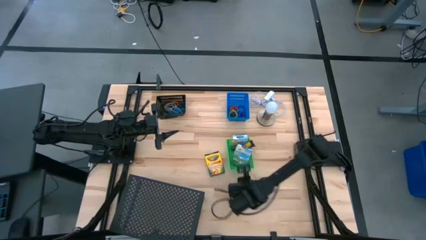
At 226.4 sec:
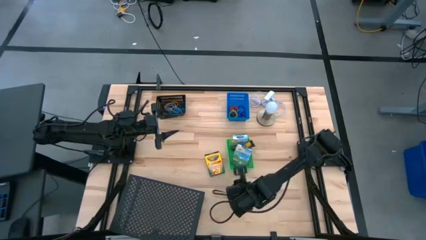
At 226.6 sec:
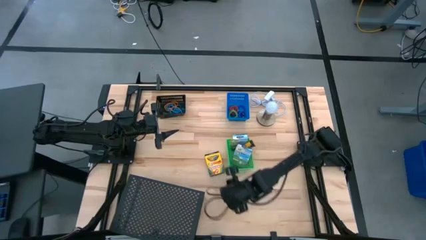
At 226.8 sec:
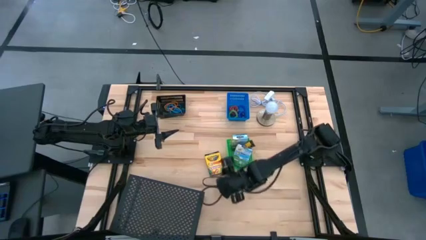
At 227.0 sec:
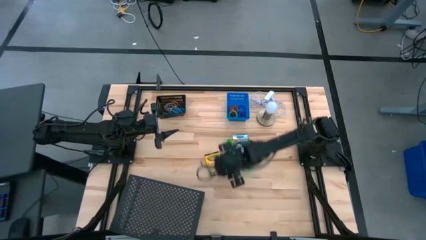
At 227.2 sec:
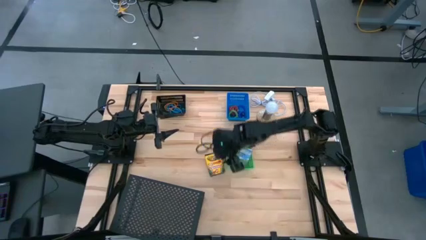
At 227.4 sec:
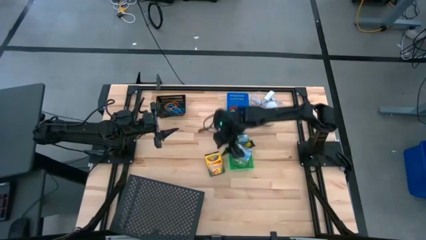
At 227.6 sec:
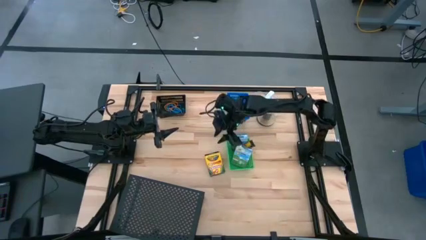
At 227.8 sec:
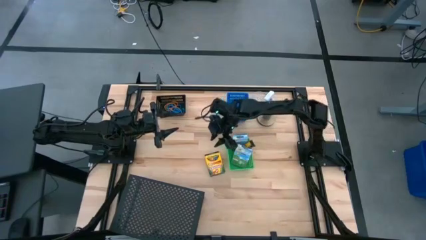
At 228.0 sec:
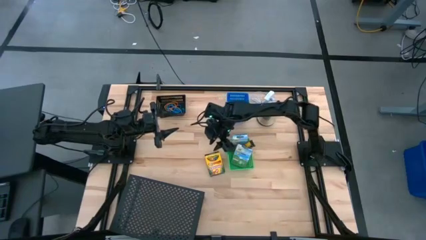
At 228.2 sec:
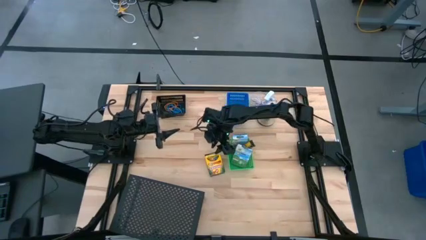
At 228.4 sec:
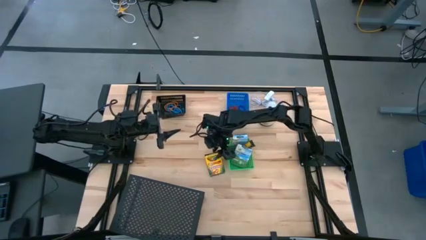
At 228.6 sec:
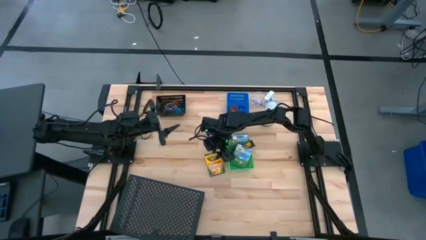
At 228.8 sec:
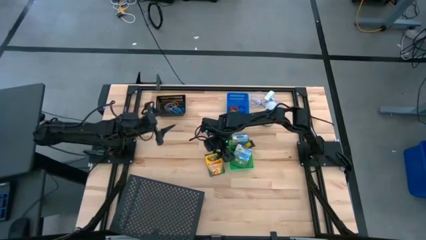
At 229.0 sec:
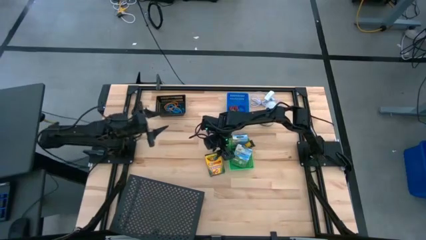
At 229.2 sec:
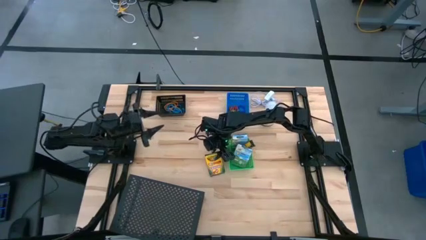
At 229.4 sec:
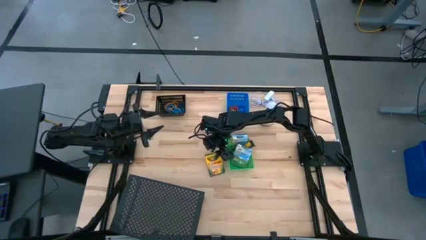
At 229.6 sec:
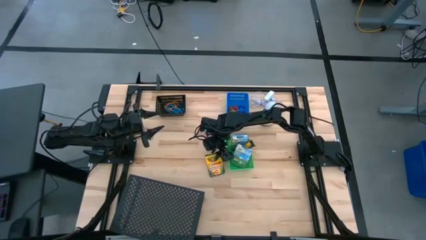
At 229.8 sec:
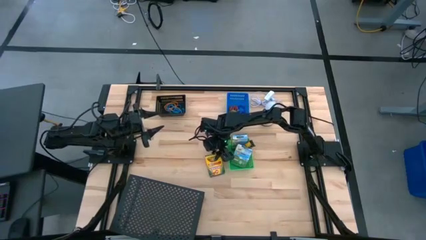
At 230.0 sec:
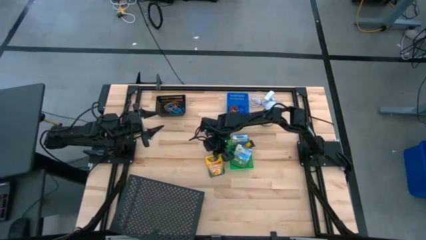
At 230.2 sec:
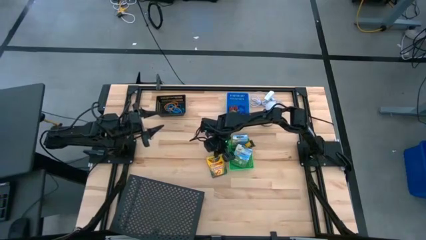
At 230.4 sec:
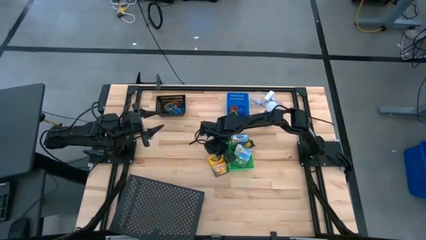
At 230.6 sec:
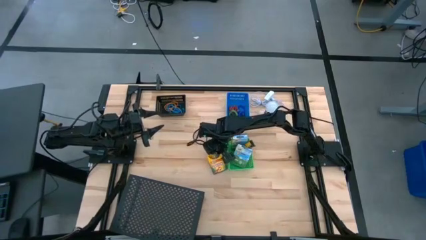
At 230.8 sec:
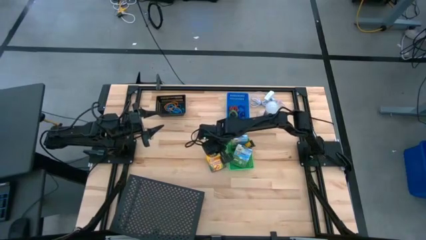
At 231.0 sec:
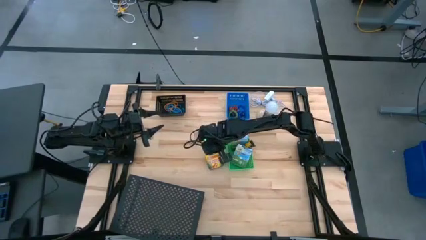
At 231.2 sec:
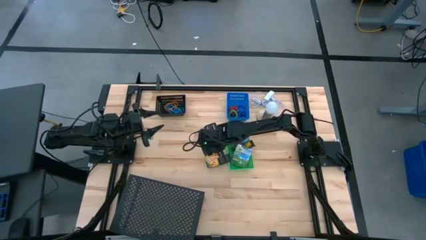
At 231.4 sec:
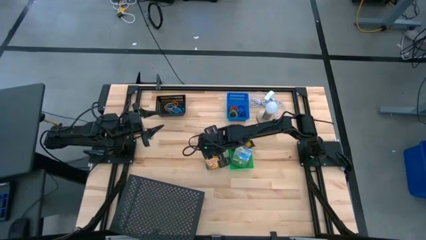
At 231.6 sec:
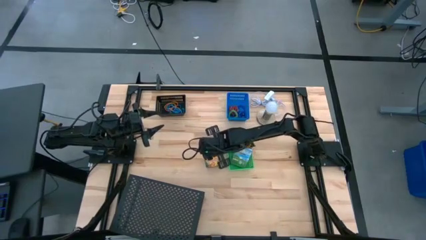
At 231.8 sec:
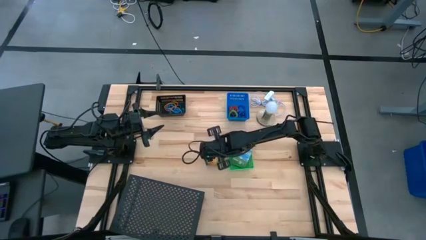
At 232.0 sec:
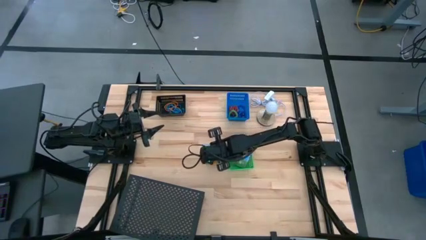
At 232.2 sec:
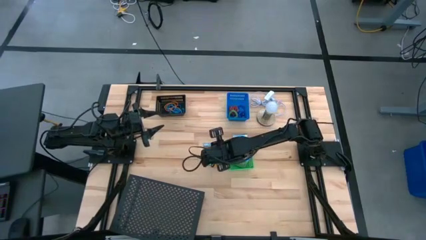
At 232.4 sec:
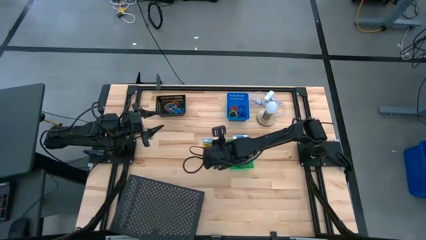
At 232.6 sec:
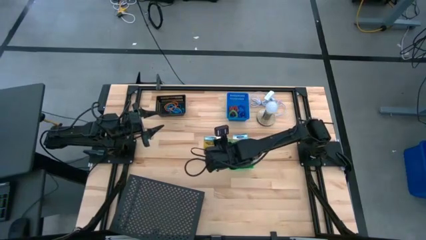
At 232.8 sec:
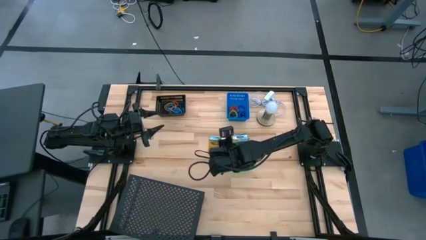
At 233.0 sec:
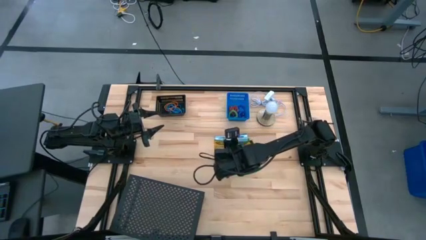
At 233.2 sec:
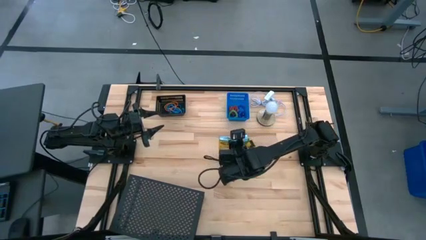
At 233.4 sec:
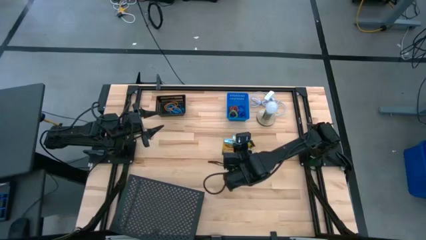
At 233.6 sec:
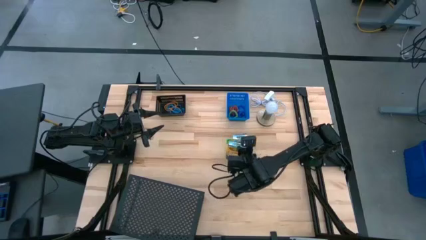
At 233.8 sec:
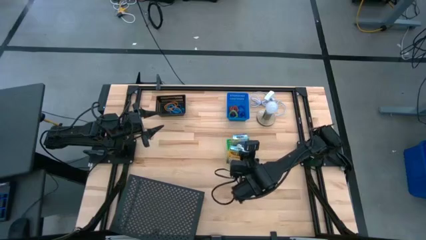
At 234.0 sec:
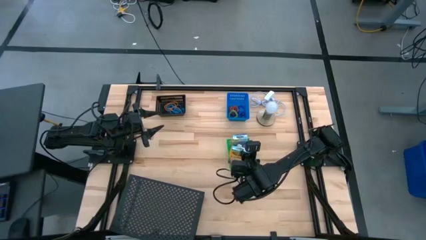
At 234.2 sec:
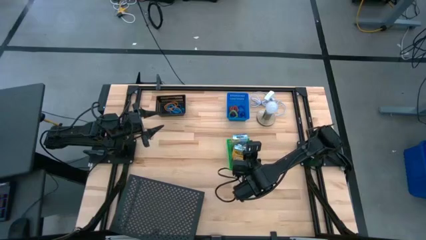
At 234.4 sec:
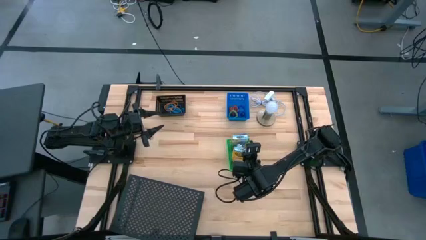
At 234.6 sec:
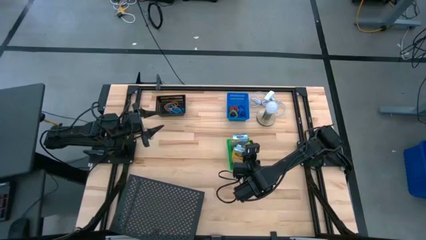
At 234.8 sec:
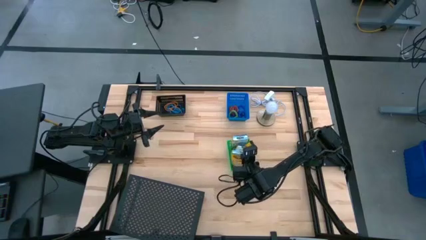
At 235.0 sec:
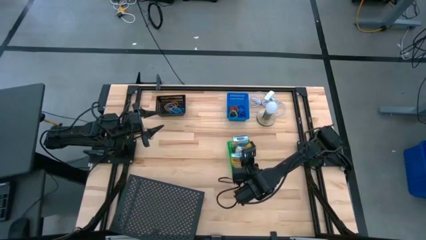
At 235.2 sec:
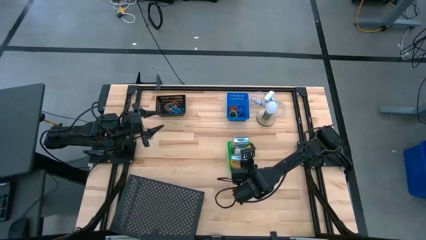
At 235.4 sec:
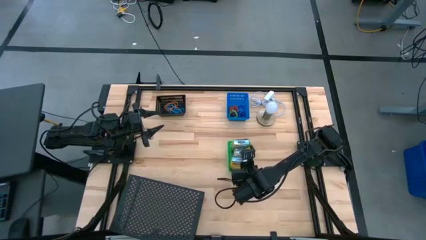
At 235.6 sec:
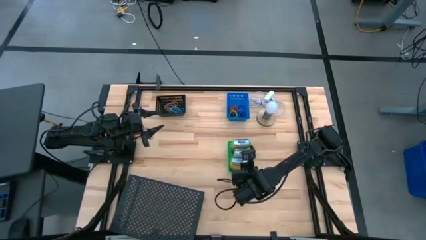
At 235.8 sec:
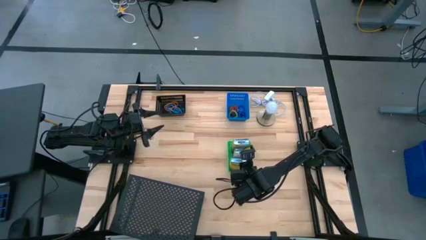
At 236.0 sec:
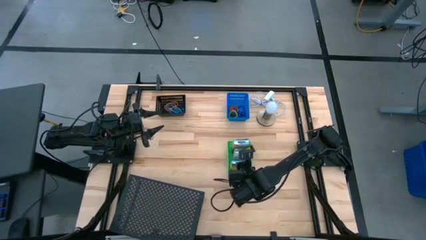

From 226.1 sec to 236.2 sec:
Task: Pick & Place Office Desk Supplies
Put the large crayon box into the green bin

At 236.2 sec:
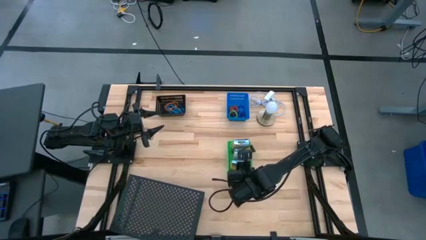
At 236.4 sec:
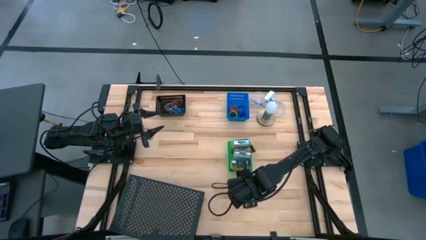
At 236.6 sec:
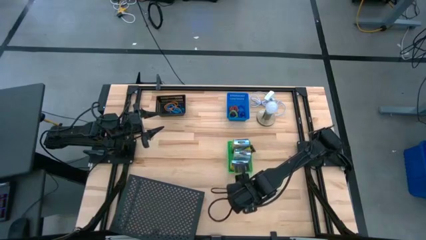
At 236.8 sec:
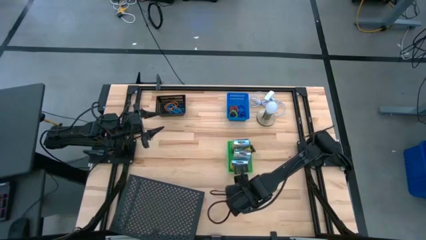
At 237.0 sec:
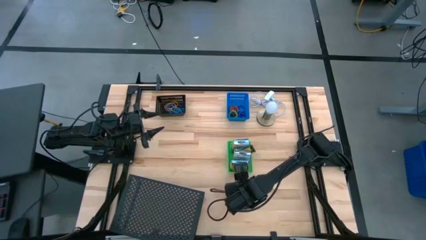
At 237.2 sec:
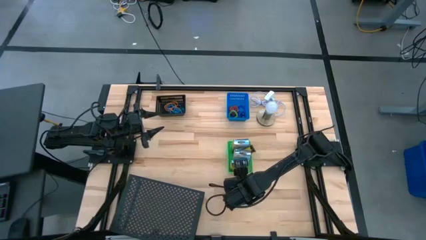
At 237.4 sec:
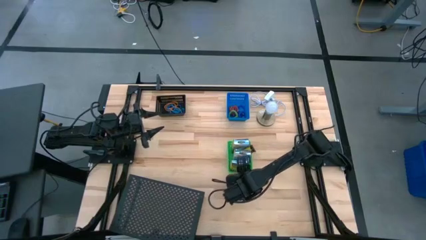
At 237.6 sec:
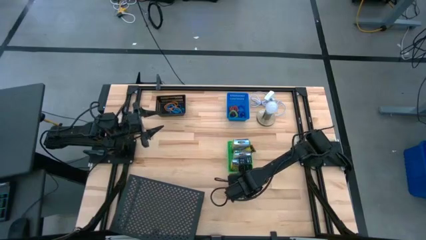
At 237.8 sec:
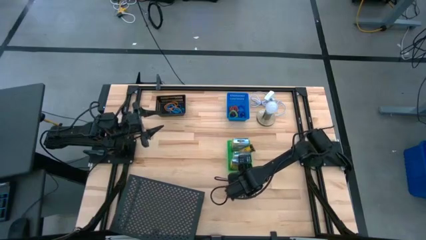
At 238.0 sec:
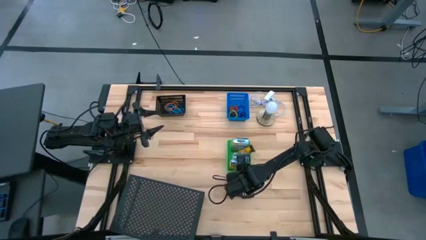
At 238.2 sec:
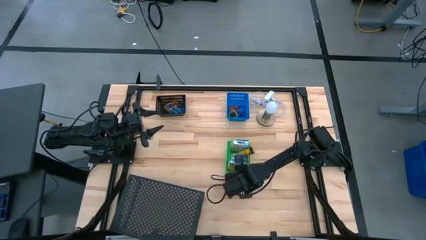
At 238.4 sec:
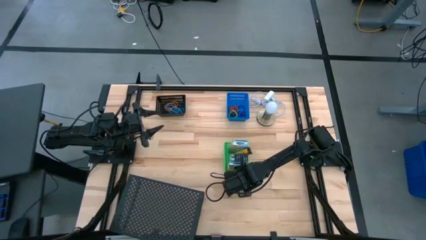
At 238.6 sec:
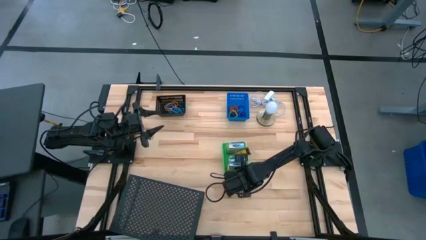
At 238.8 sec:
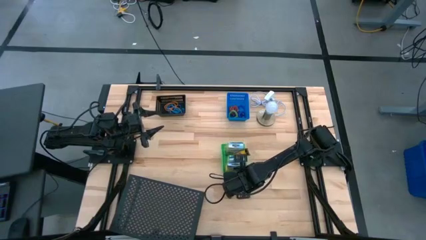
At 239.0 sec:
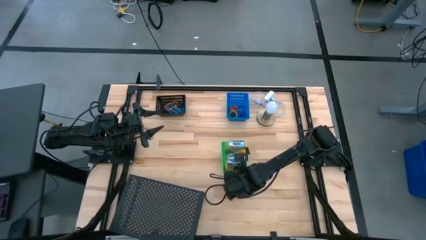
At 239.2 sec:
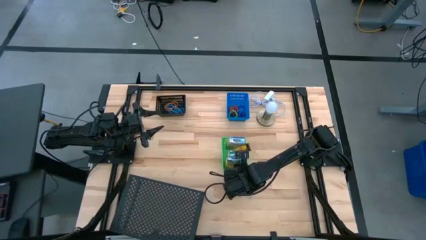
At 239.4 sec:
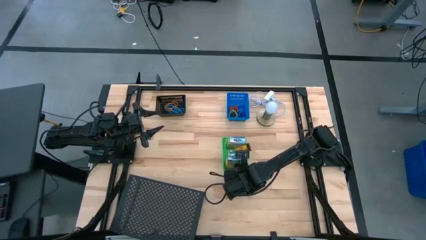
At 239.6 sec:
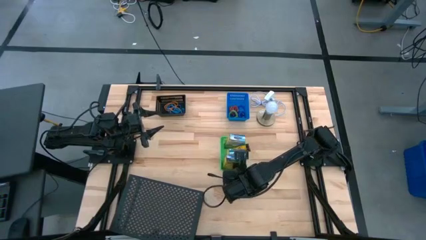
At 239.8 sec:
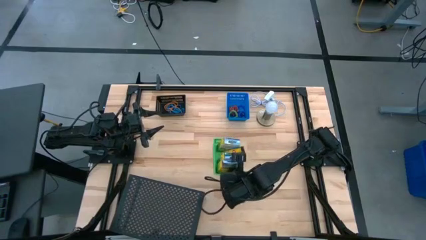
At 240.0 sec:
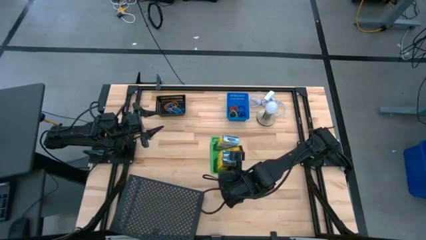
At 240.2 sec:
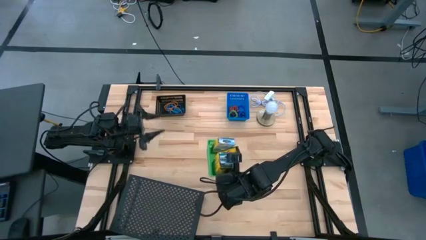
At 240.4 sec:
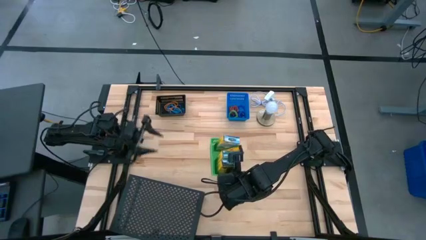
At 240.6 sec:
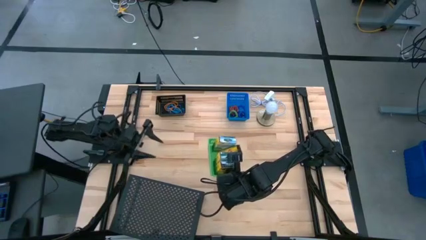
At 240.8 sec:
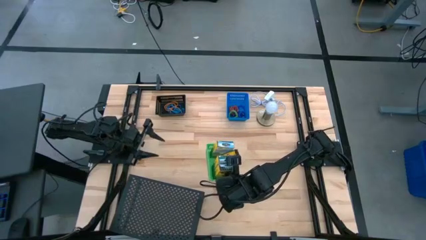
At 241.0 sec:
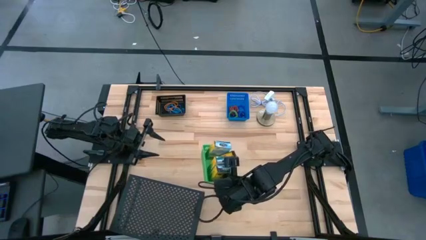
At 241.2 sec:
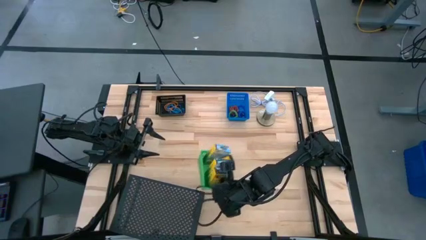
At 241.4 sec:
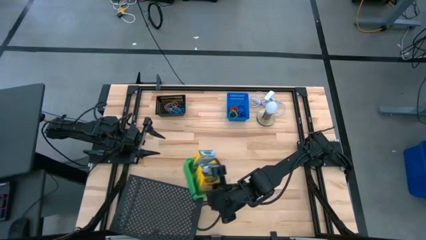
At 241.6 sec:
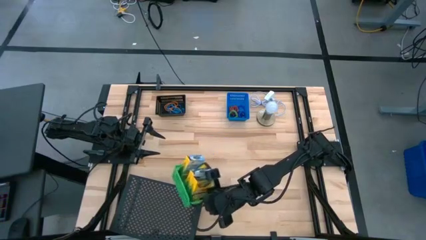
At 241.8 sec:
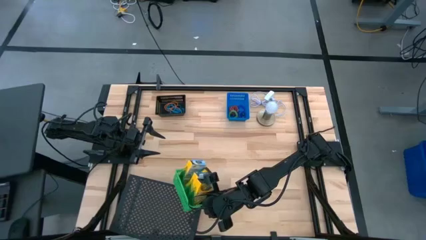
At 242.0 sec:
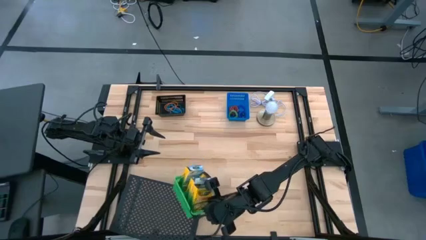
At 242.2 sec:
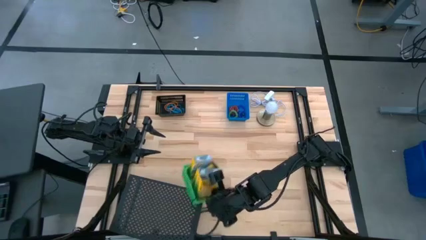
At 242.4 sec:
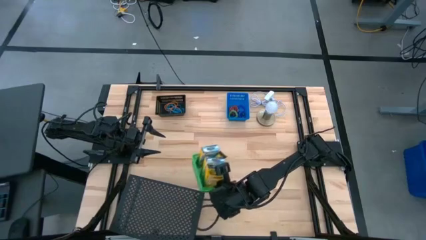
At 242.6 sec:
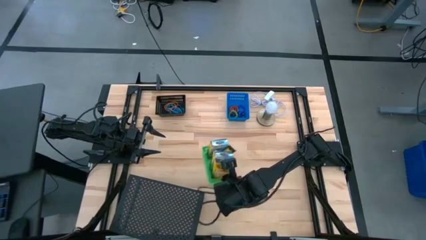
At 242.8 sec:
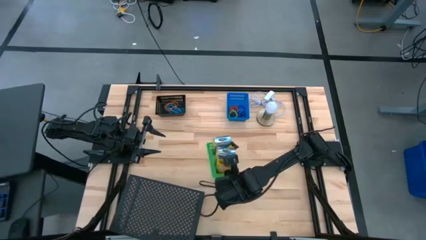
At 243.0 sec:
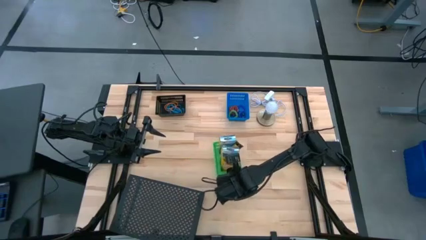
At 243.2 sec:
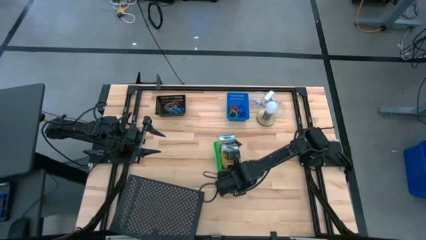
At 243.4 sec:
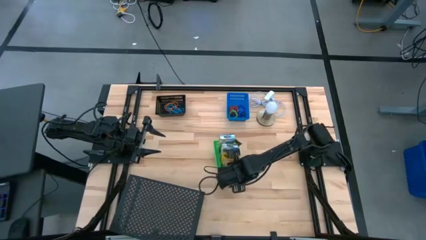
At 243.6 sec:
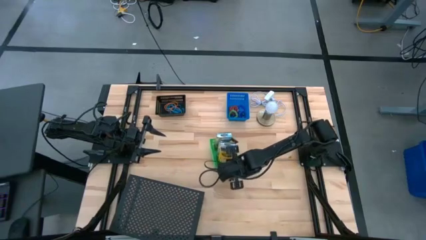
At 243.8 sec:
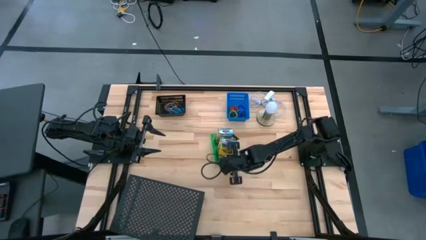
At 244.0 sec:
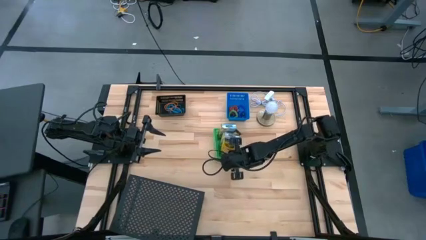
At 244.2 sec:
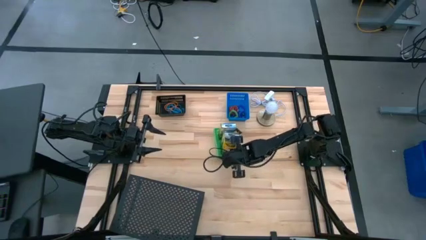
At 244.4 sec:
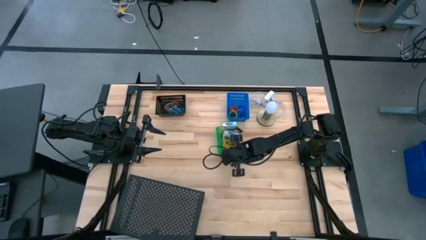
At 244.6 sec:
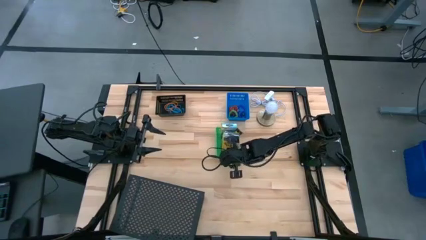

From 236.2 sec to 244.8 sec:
Put the green bin with the crayon boxes on the shelf
